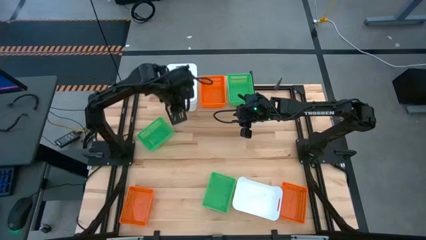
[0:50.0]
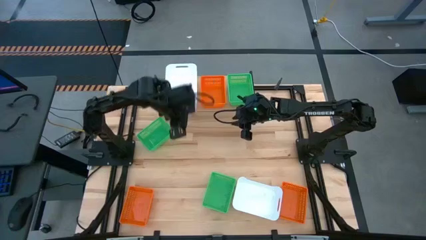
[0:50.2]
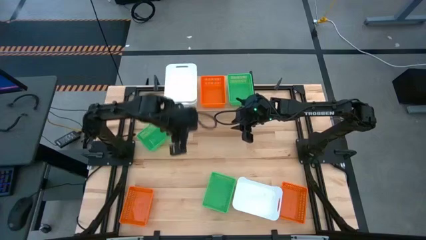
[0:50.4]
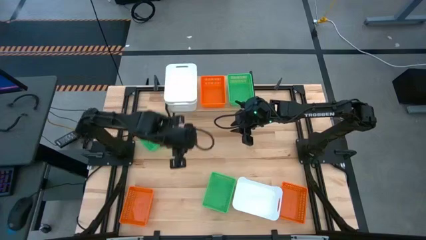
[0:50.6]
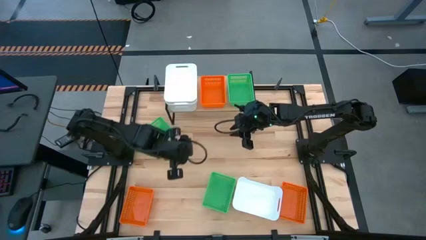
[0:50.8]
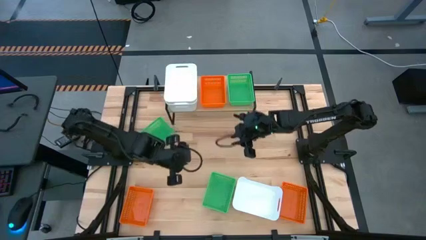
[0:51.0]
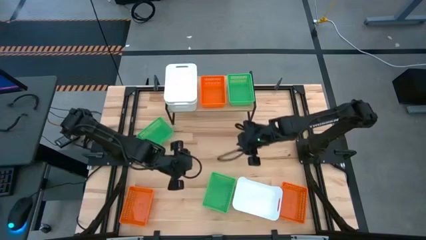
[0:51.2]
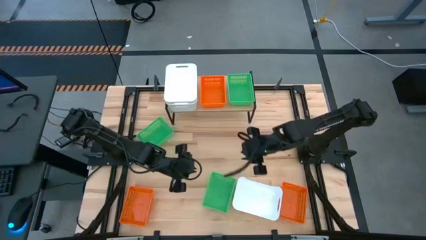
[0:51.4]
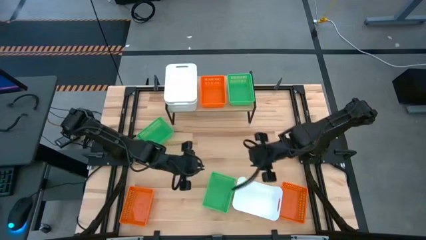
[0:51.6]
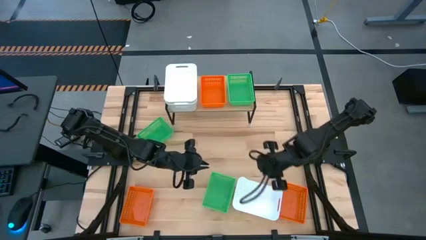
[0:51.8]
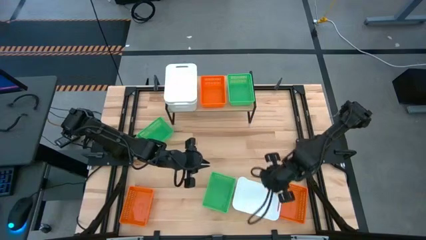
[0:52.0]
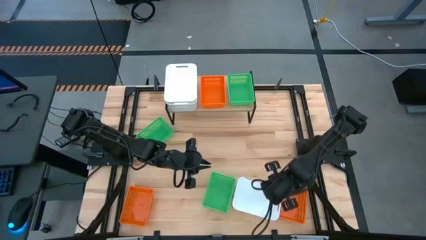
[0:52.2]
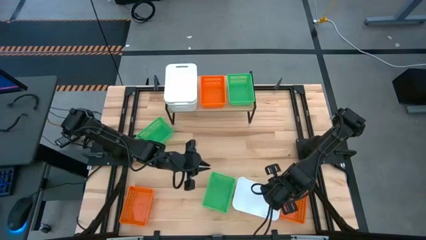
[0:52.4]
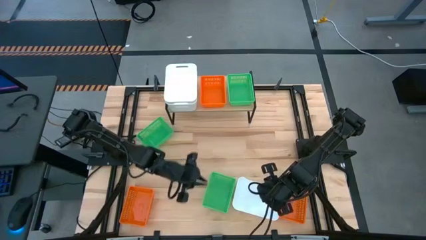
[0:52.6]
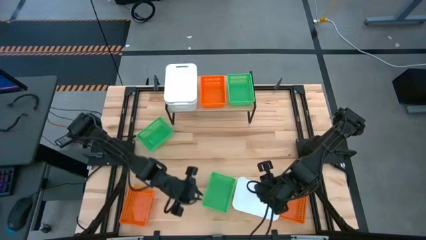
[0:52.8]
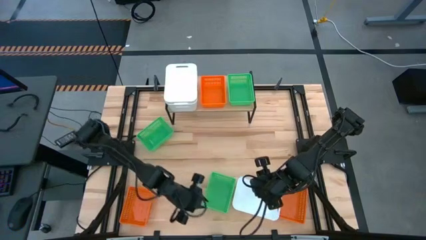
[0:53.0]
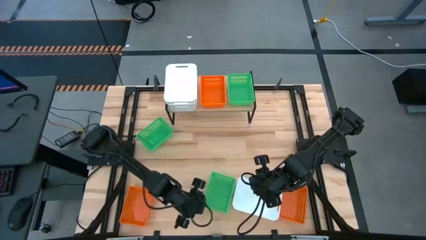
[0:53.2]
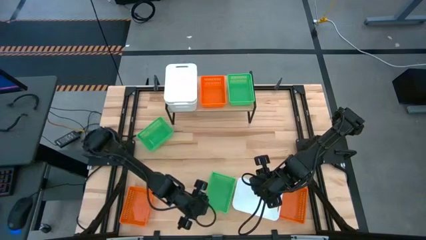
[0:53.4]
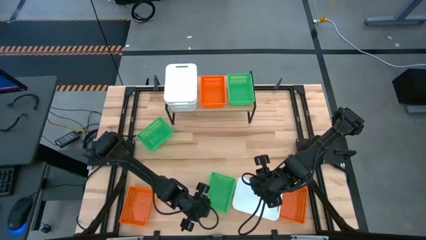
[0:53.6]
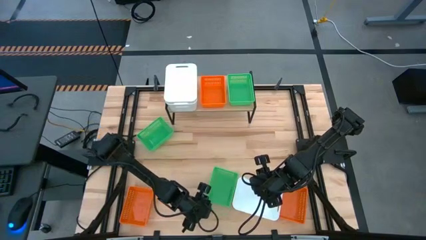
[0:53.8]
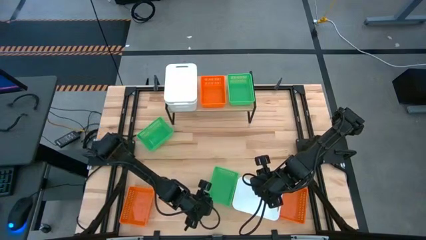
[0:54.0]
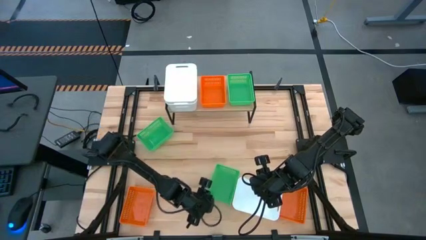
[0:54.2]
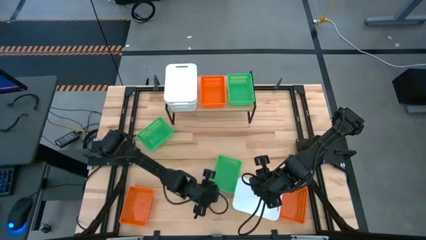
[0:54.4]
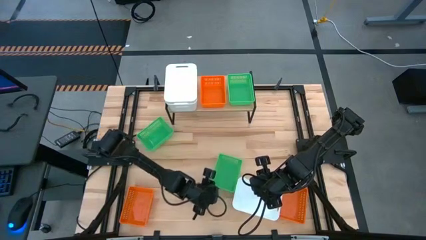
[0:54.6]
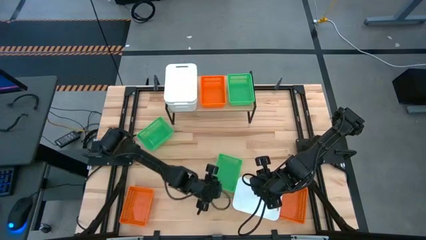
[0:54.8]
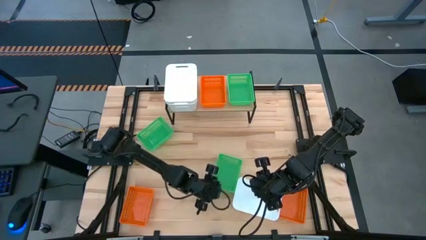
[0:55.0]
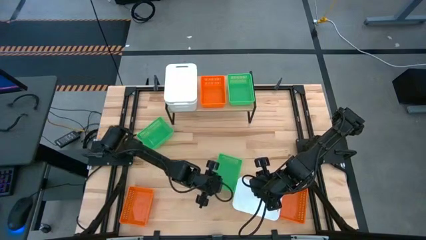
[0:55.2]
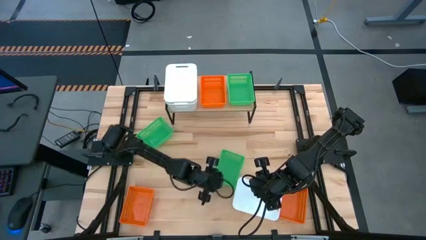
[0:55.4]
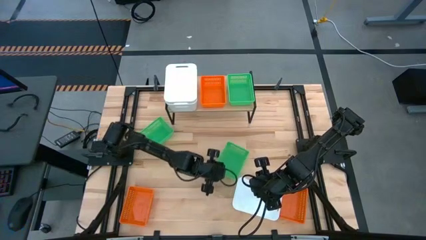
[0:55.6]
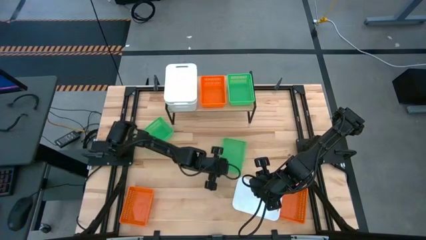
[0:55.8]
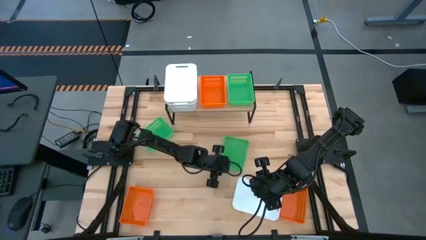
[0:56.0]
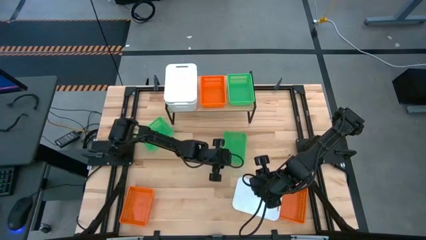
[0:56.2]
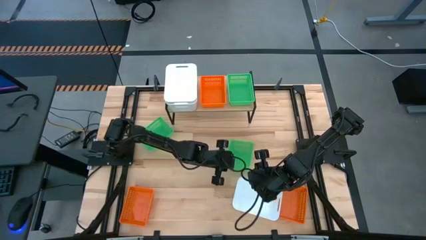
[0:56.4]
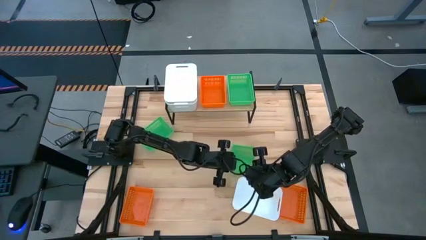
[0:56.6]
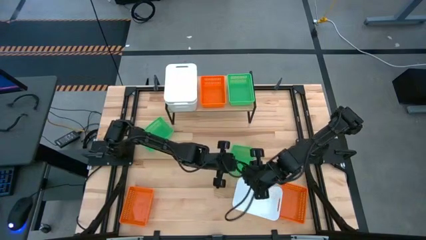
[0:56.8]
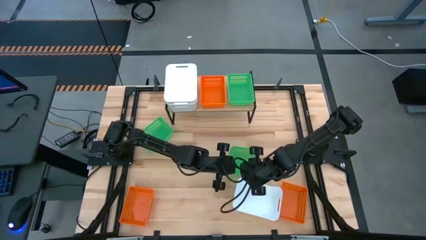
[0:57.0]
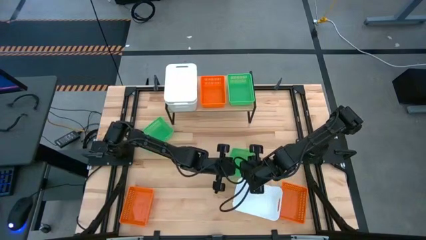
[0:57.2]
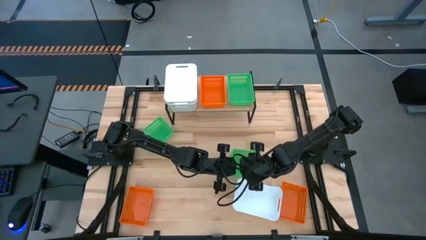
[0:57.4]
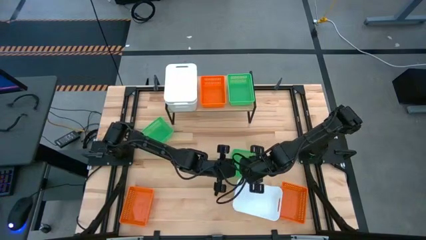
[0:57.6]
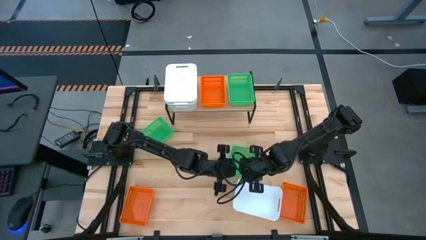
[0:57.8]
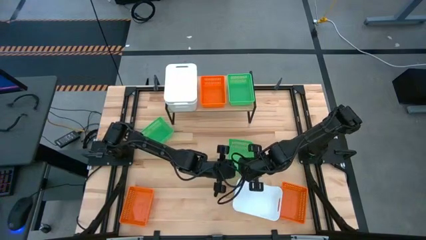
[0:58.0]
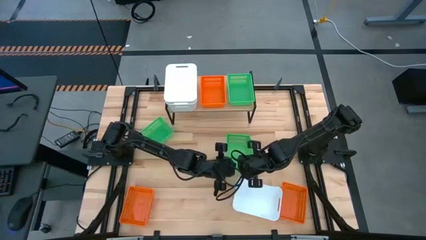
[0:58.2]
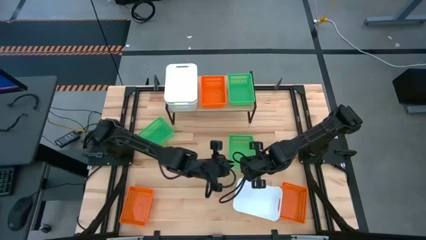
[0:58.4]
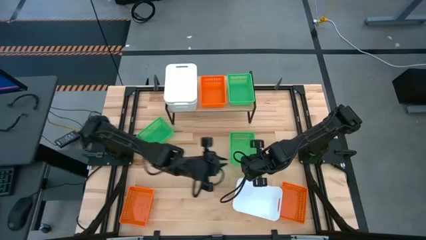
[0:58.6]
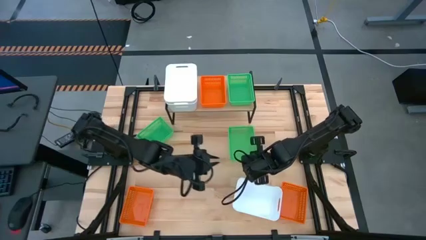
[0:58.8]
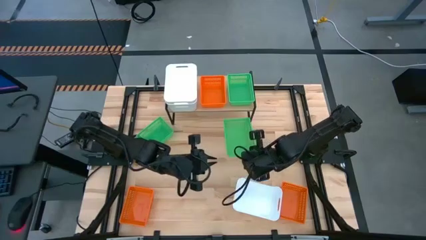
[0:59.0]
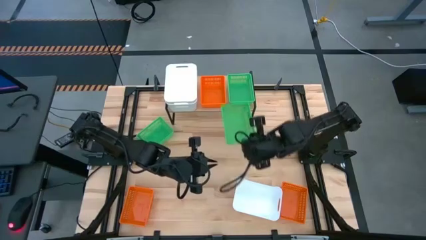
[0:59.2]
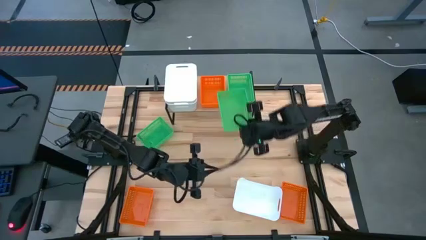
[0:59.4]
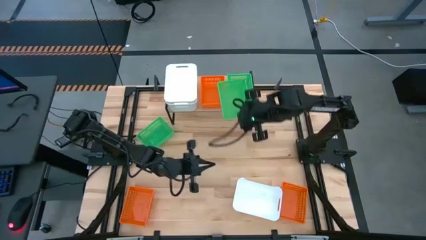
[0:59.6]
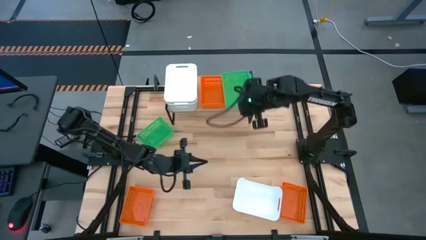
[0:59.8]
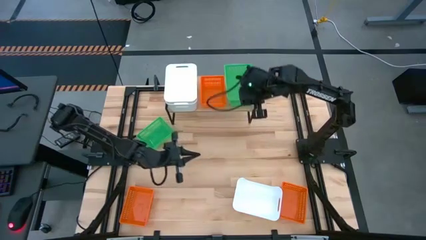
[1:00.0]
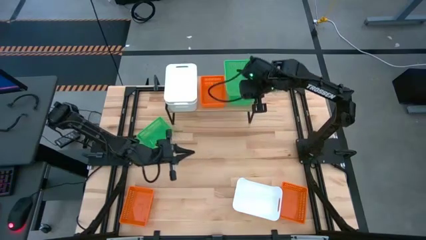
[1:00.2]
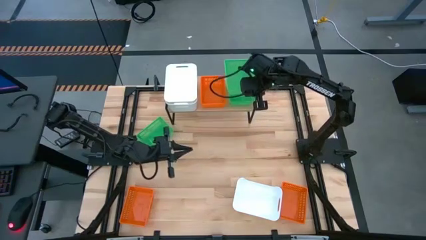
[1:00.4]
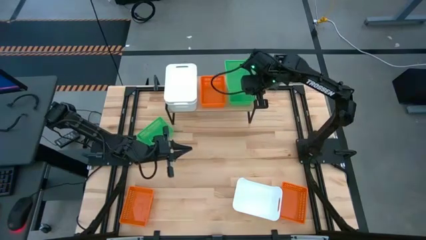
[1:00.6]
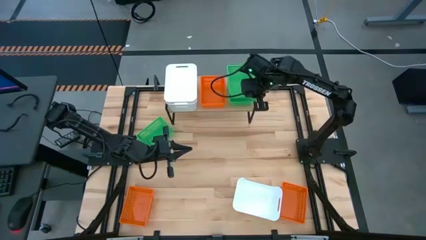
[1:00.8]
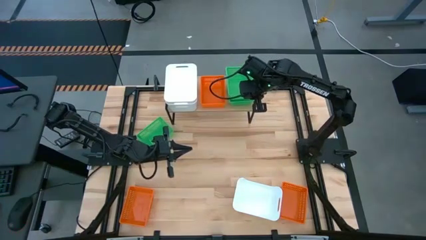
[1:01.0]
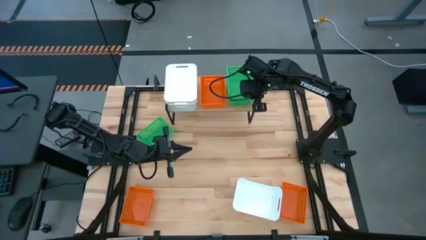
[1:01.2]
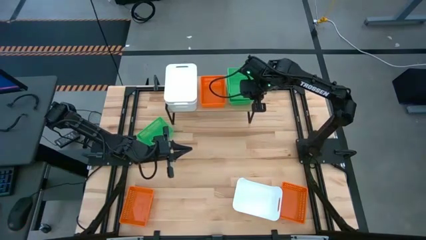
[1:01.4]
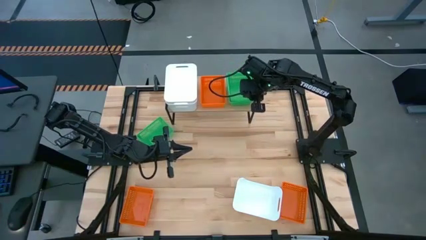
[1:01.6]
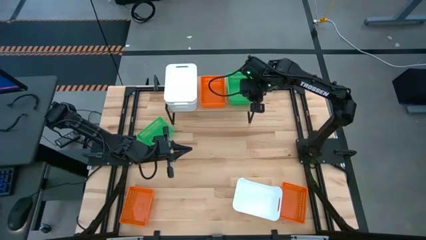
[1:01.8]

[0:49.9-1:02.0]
Task: Stack baskets on shelf by color
Stack the right green bin on top of the green bin on the shelf

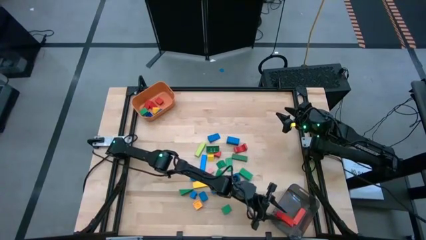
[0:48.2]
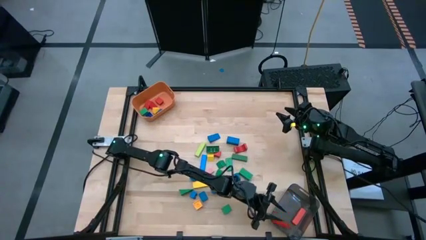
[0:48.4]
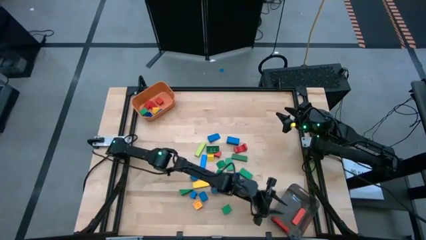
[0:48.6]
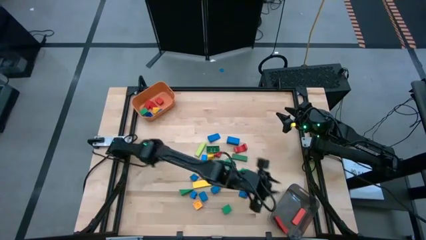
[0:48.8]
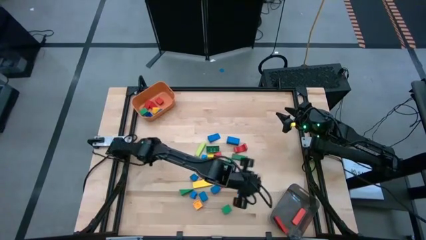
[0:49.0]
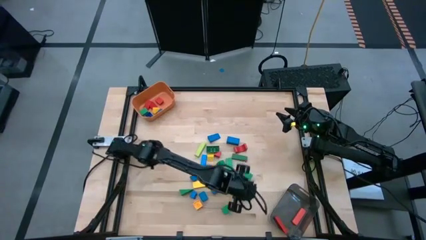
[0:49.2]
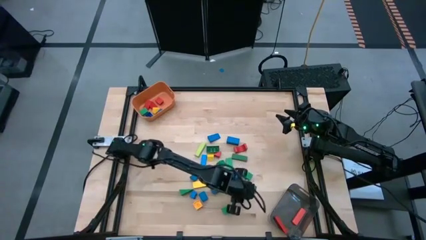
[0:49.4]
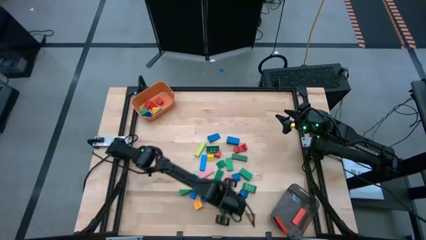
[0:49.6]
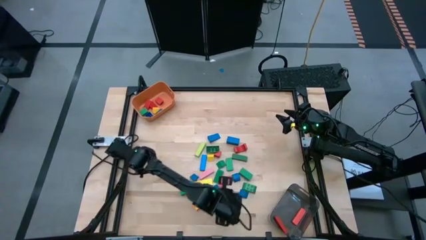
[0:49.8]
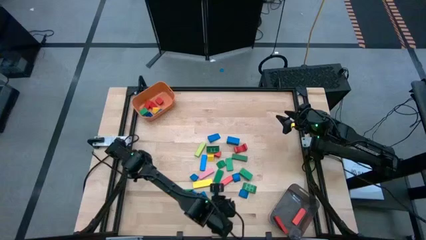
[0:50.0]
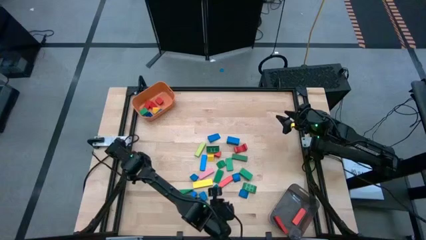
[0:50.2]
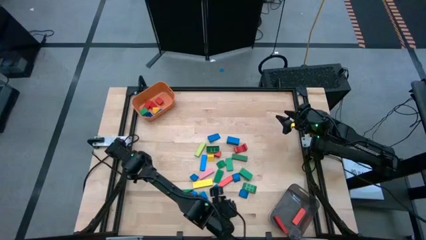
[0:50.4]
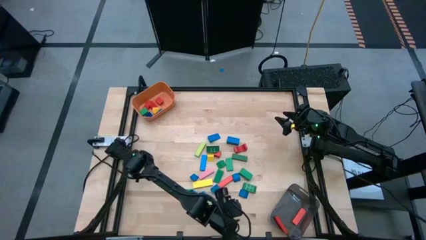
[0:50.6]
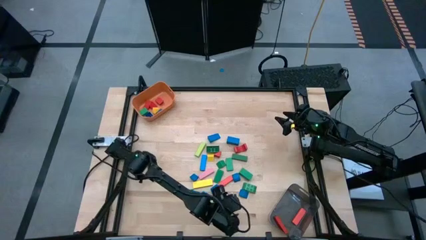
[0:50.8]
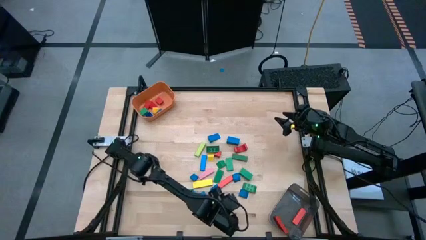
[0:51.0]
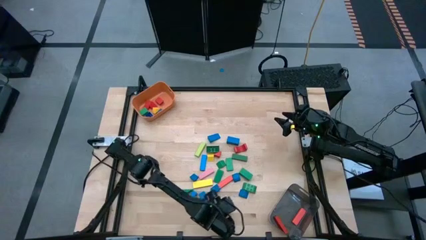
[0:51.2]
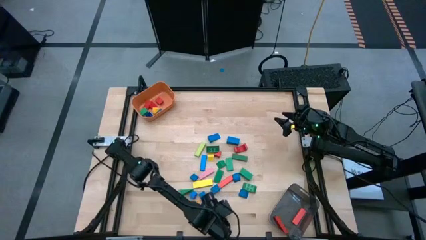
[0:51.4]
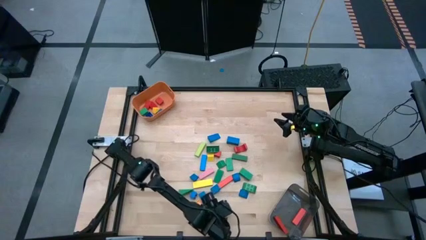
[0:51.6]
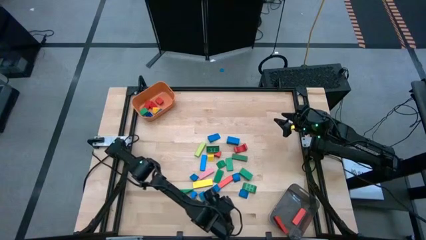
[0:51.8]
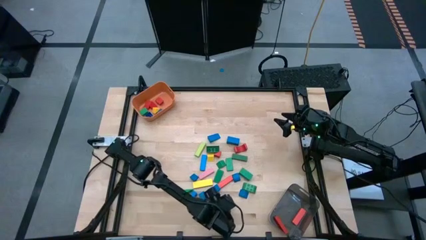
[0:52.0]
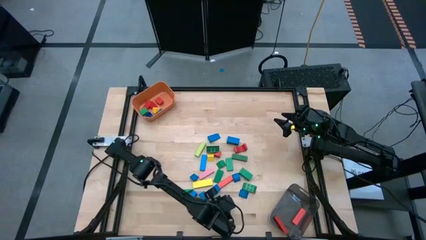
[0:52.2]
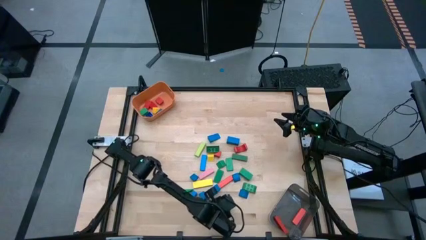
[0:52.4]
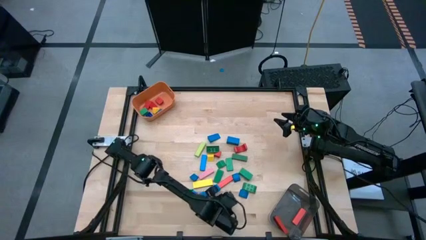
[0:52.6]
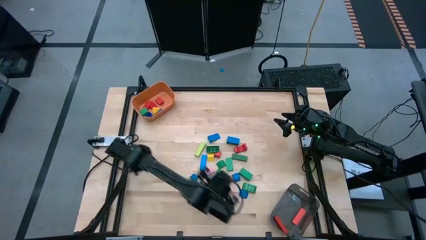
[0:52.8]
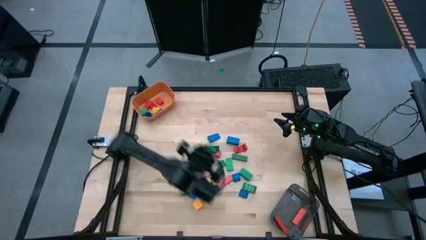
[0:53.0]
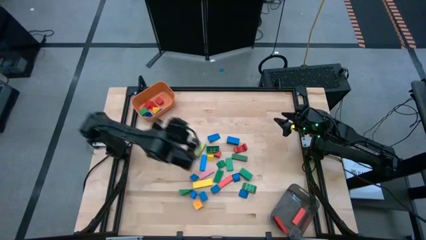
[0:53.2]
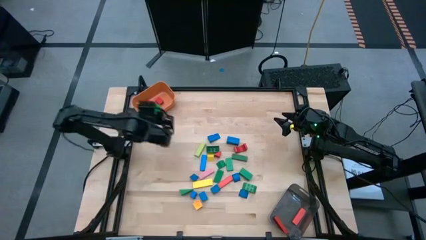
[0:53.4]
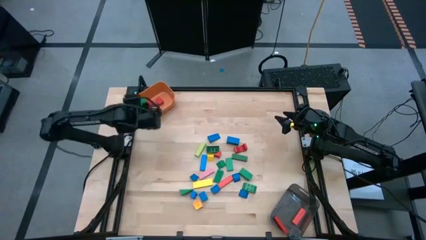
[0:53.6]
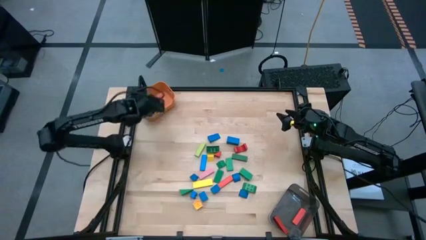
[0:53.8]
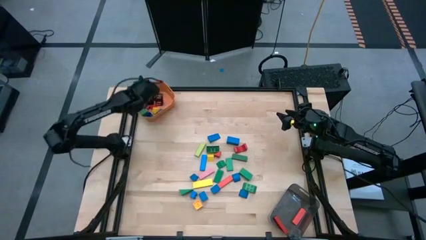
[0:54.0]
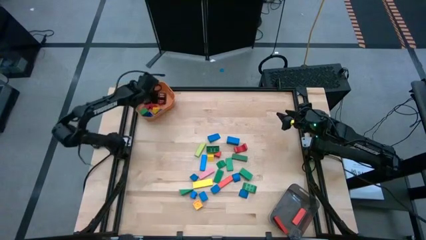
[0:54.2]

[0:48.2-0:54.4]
Task: Sort blocks by size
Put the small green block into the orange bin
